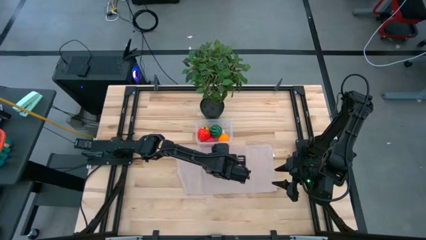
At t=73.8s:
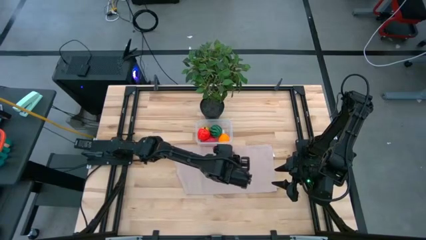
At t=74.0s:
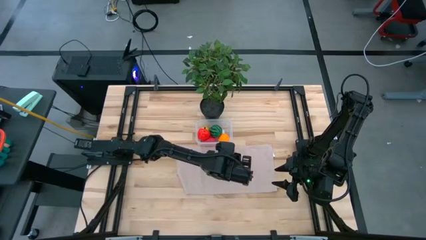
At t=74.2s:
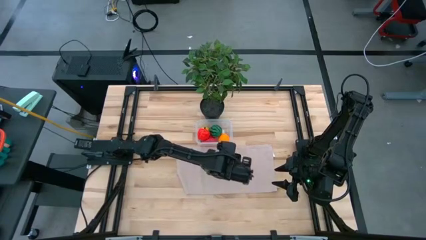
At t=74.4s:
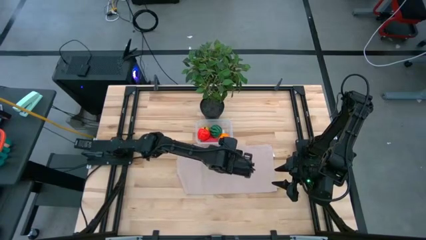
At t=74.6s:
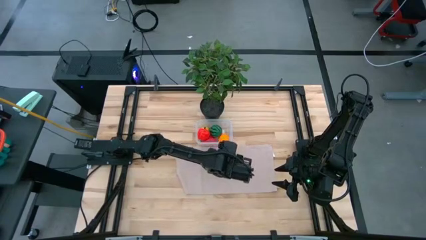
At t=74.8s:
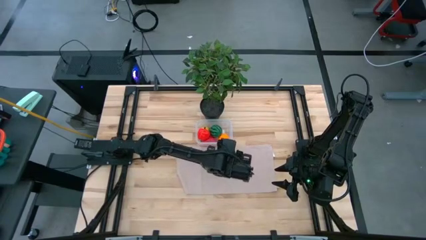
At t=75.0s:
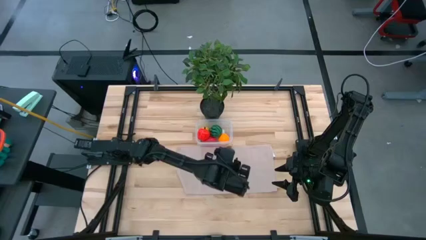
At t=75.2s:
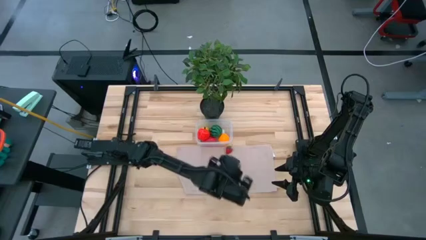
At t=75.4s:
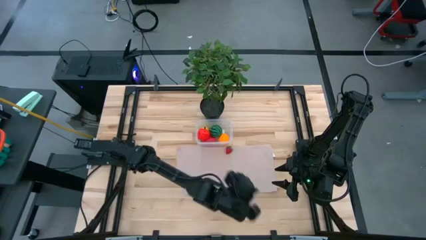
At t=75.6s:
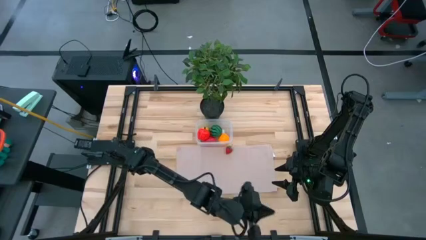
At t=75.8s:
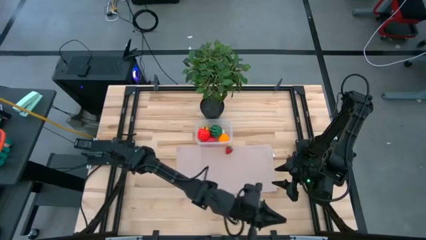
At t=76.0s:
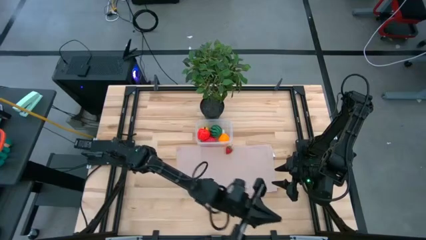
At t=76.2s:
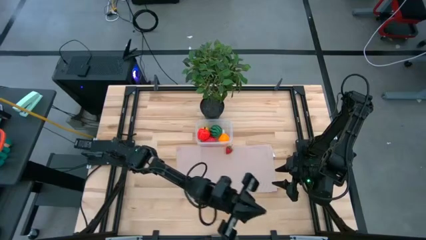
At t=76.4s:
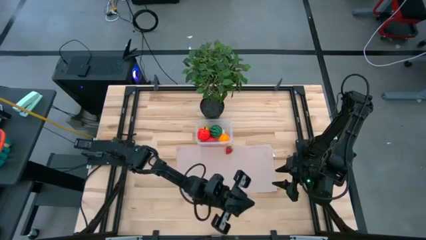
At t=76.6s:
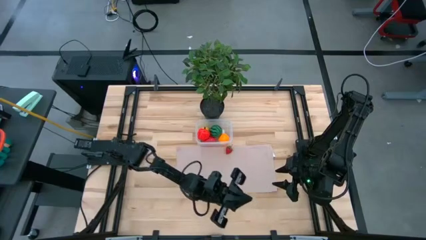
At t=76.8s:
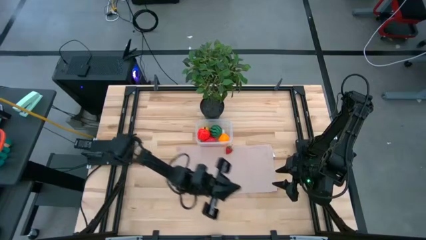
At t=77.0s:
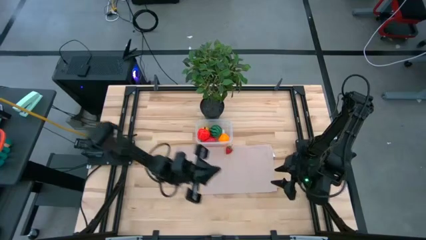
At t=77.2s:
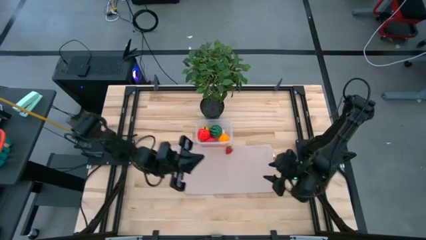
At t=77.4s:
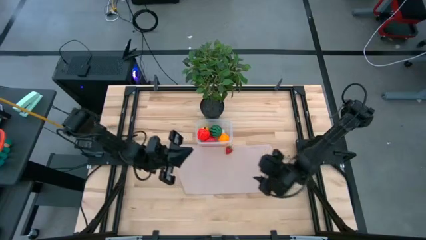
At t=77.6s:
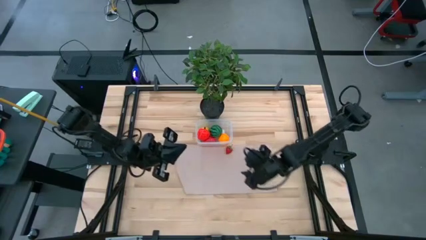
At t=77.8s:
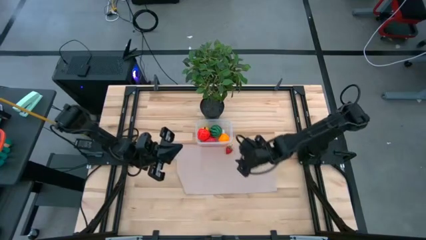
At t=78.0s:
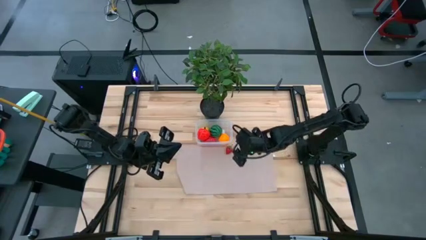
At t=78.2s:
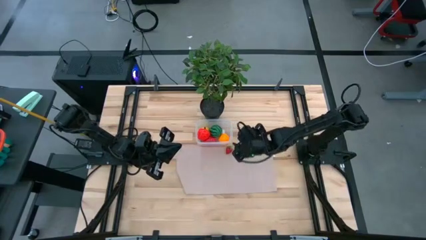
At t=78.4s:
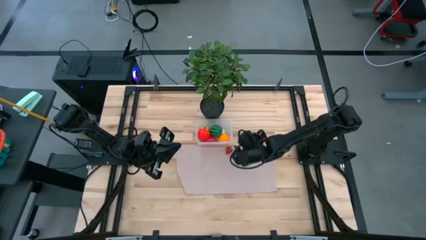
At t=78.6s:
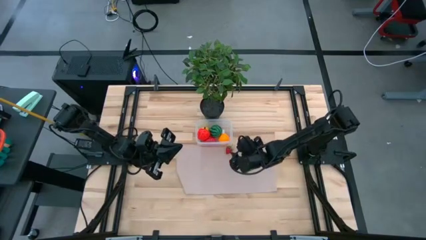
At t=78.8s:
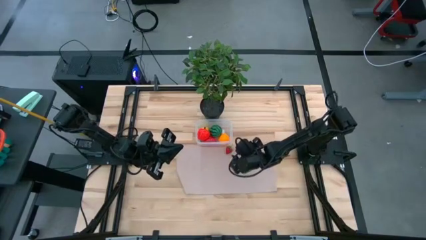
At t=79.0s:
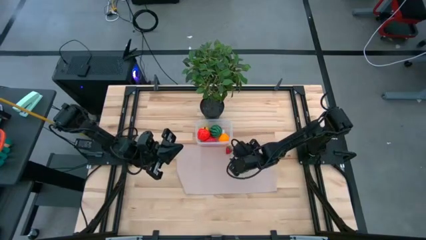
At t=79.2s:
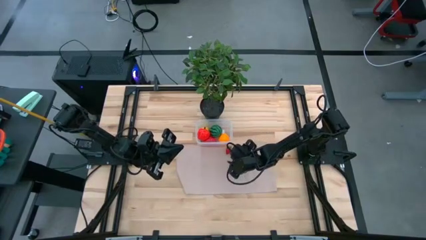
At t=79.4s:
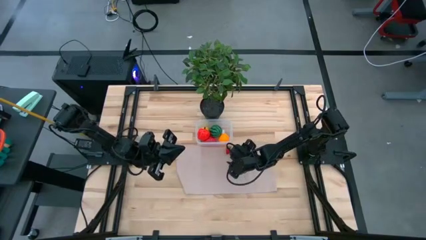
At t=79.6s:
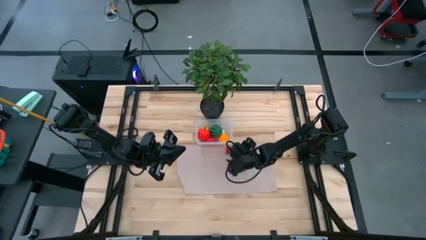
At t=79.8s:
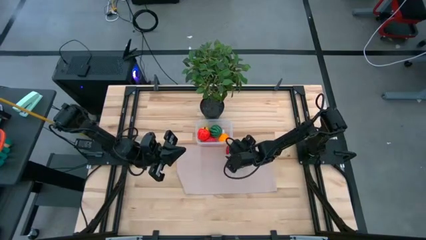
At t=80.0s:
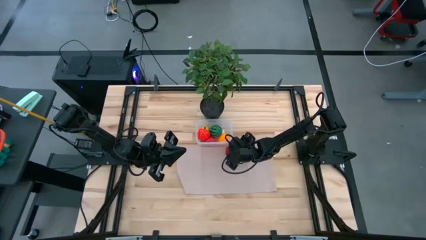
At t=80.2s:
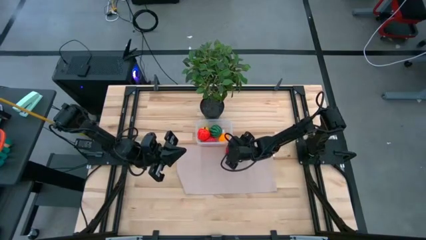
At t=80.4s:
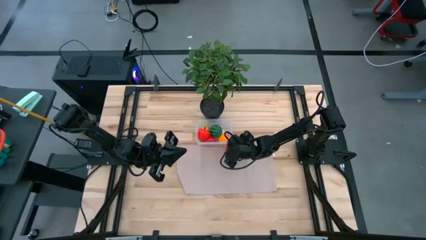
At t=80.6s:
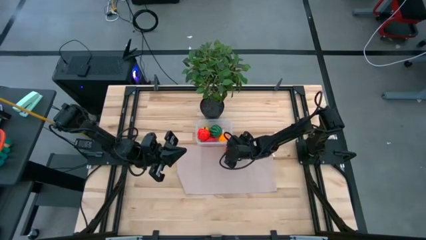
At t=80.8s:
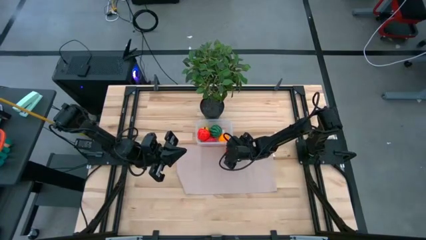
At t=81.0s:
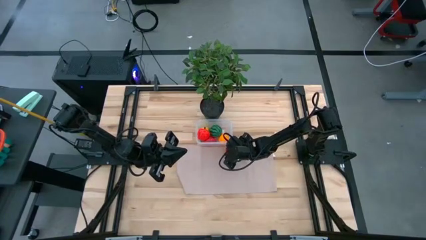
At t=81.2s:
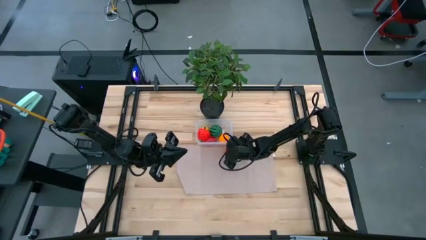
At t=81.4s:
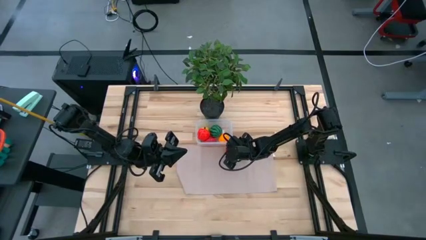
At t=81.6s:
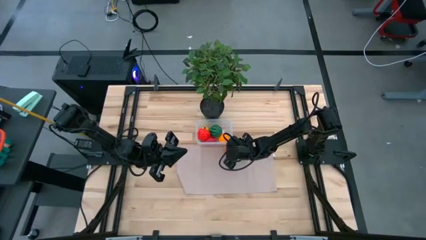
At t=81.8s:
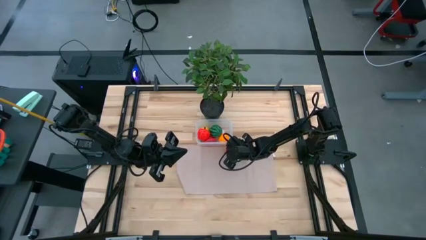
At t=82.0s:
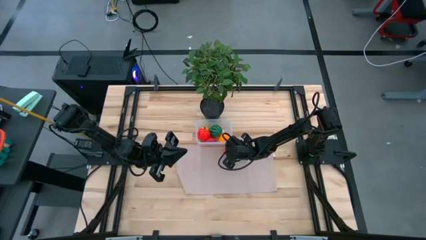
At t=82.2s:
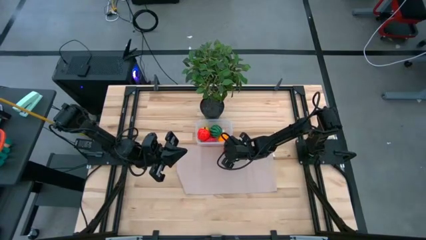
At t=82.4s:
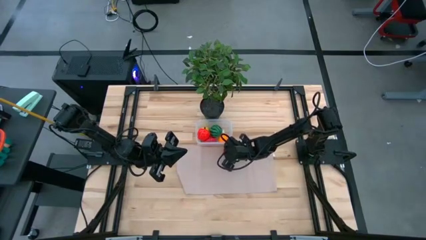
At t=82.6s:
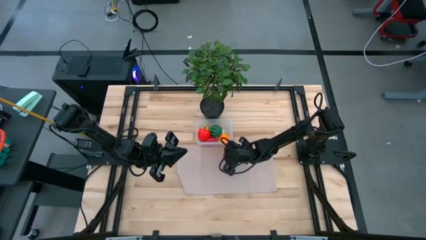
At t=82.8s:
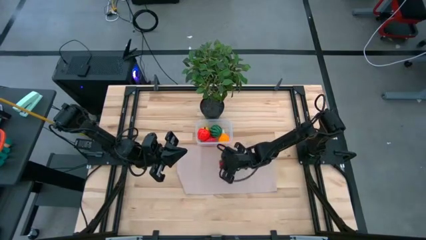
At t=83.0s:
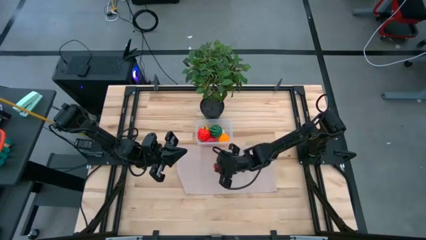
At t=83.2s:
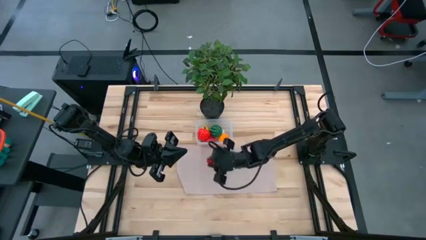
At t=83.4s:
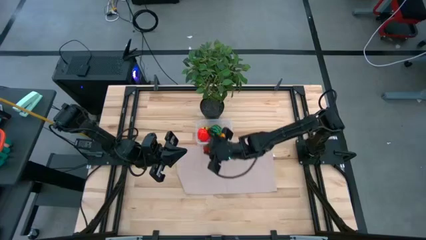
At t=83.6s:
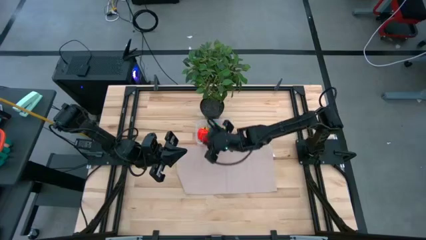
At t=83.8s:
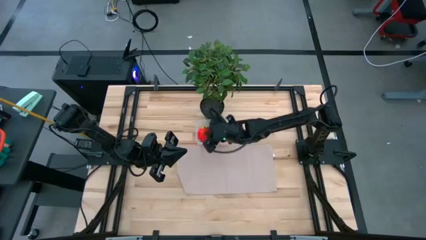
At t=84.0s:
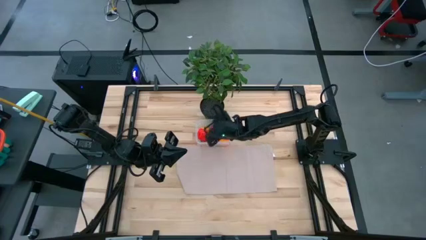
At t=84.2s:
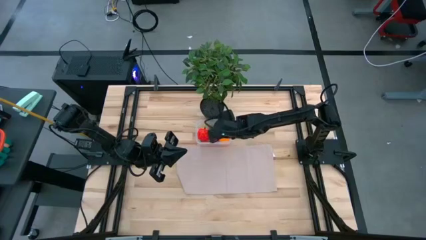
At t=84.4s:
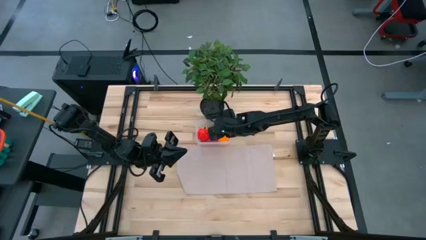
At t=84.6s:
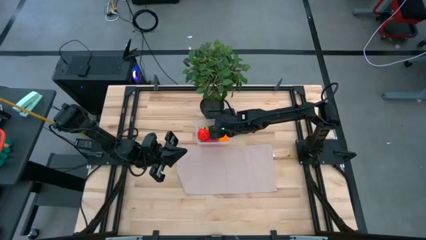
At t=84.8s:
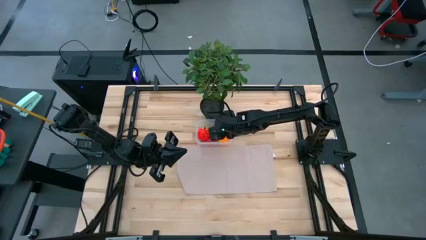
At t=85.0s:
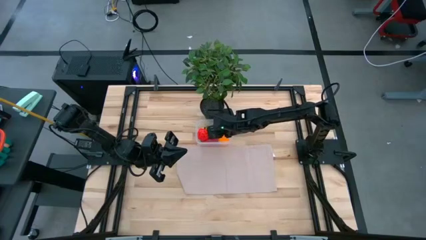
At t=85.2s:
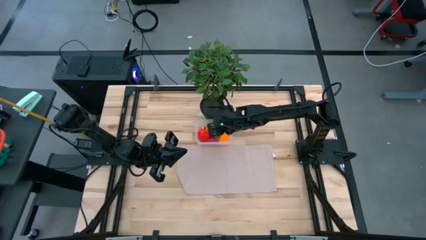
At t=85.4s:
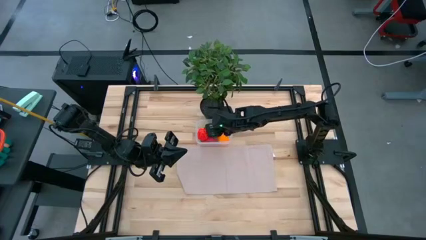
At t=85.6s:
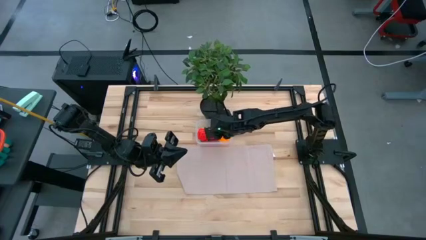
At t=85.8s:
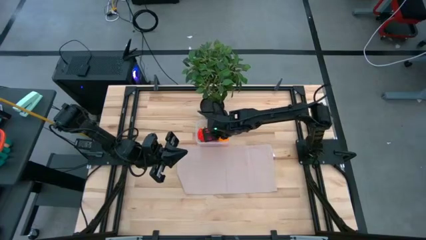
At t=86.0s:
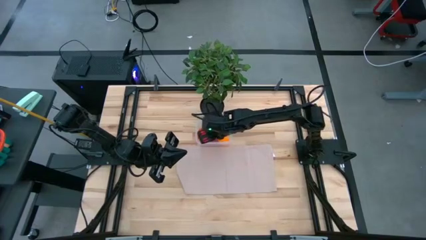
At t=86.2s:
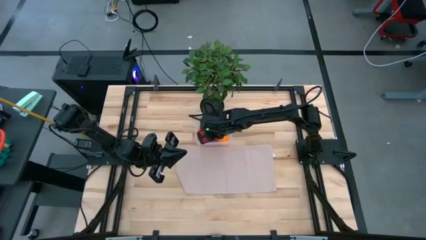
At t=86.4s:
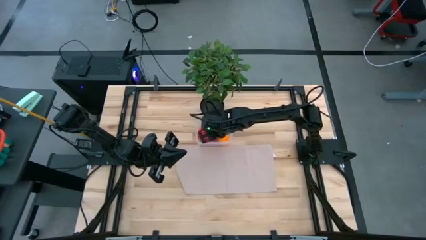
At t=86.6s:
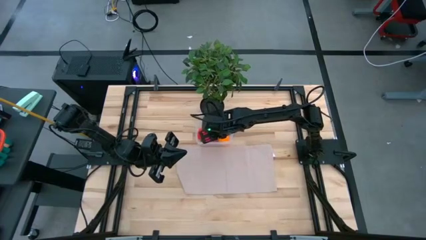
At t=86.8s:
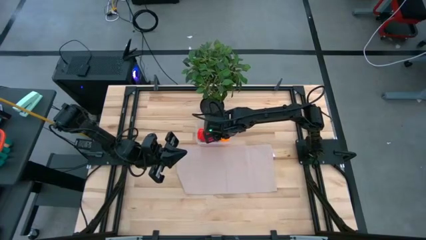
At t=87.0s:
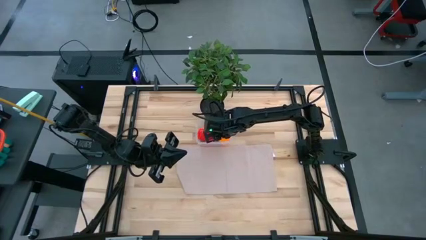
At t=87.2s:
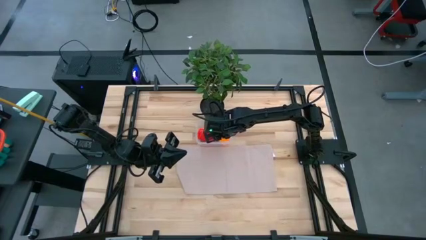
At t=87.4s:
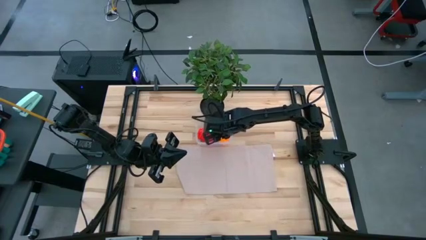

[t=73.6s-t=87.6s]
Task: Pick and placing Produce into tupperware
Put the strawberry into the transparent bin

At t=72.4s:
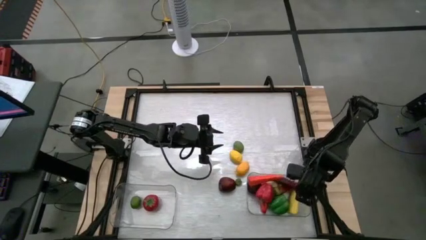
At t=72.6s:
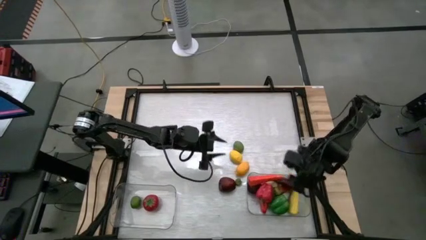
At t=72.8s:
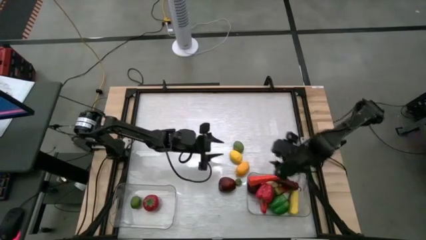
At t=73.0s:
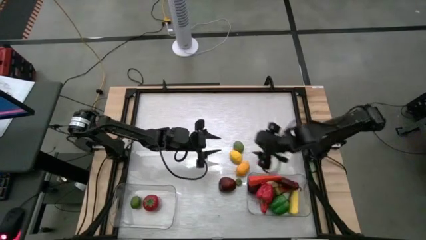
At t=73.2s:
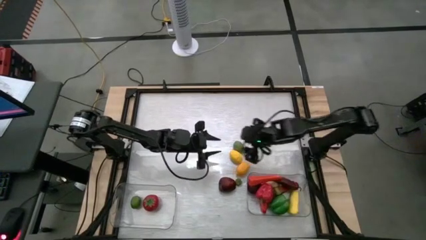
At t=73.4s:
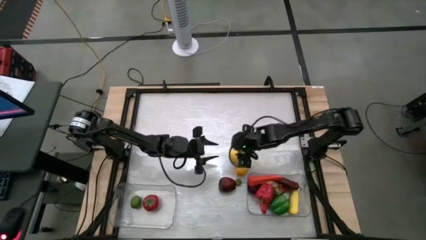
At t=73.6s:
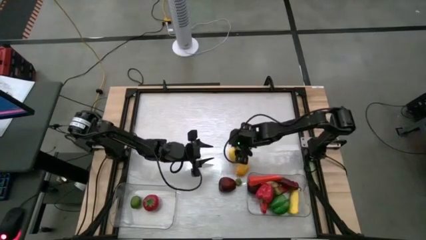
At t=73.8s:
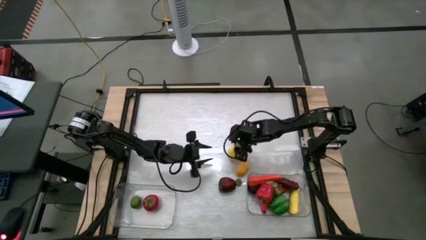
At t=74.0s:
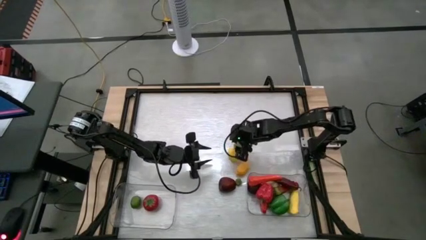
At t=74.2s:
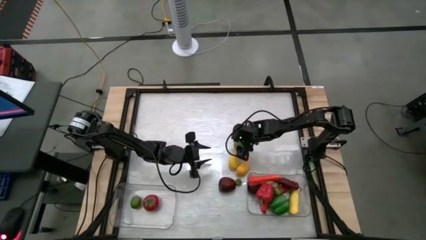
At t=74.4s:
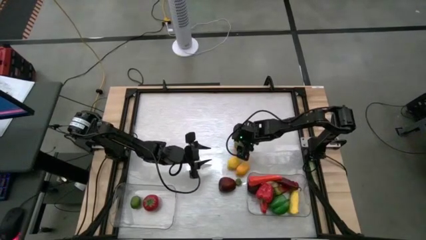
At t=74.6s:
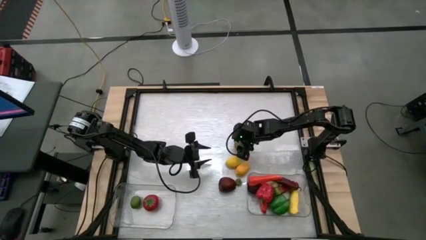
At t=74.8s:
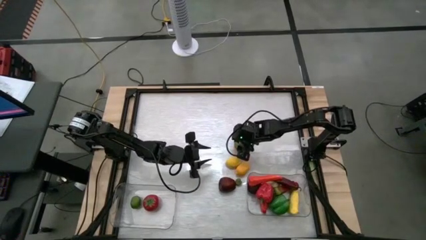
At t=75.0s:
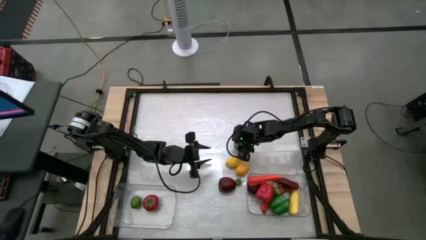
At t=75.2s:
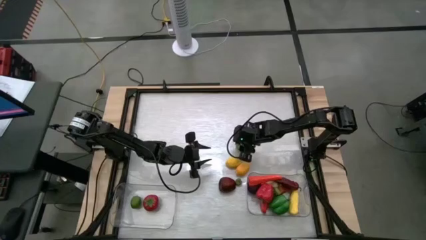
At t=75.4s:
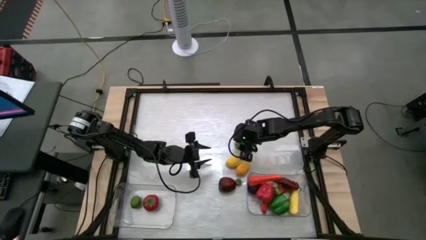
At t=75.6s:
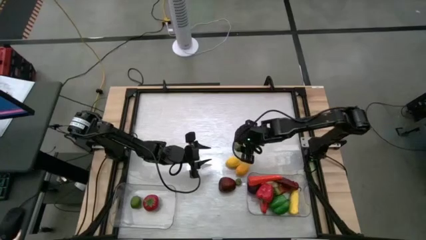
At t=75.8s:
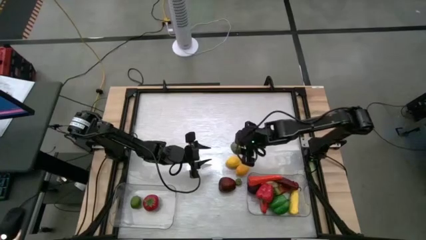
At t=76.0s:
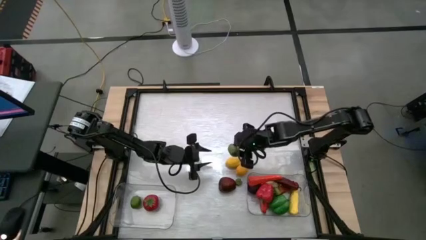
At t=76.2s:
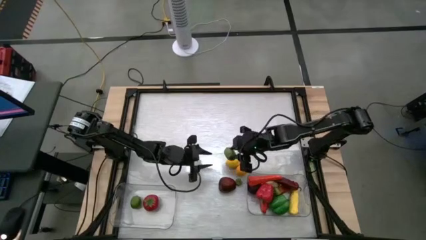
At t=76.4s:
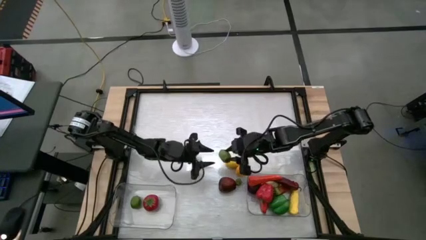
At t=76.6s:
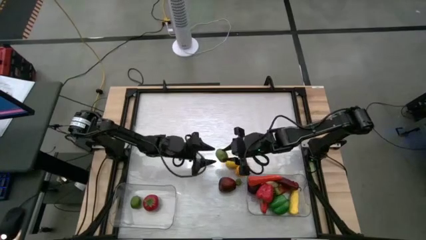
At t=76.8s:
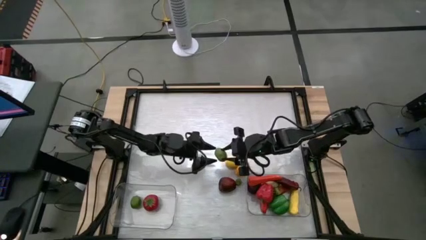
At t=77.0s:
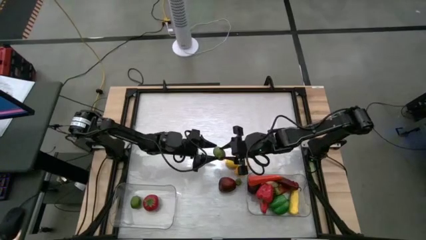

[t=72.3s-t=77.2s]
Task: Sort produce into baskets
Put the lime into the left transparent bin
